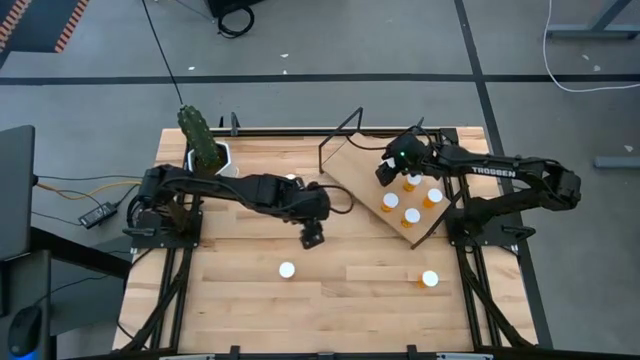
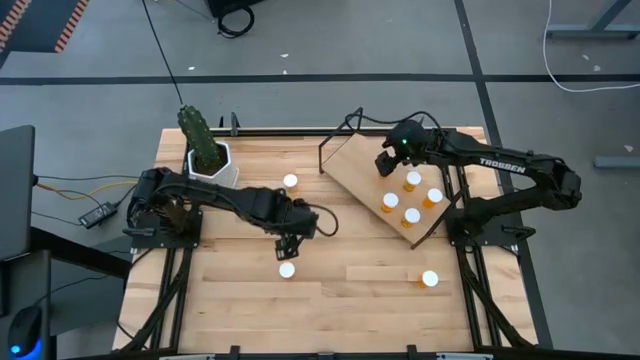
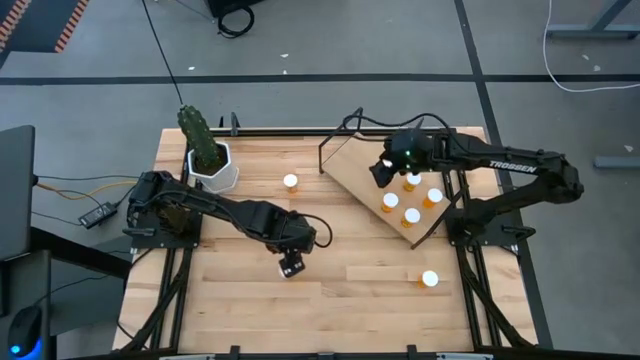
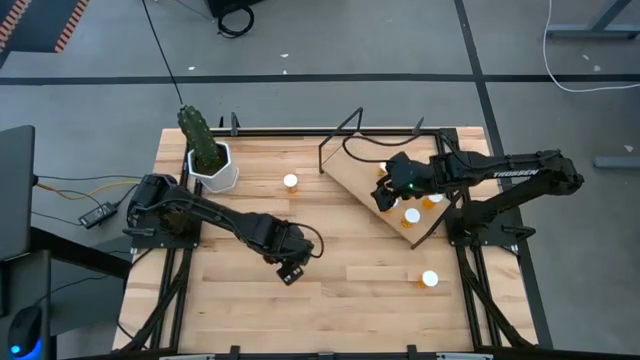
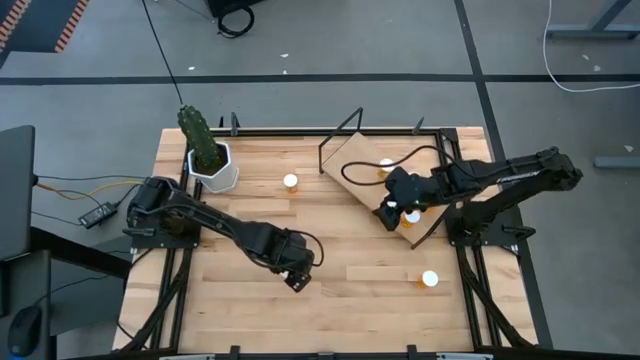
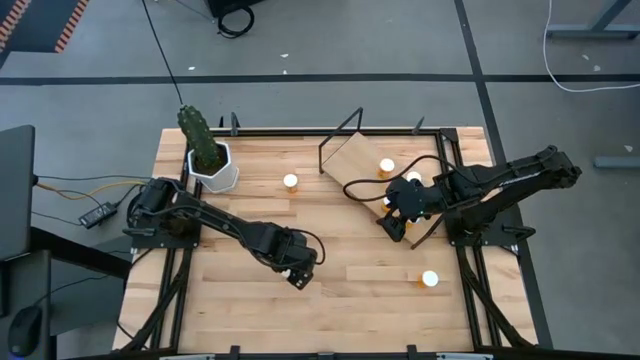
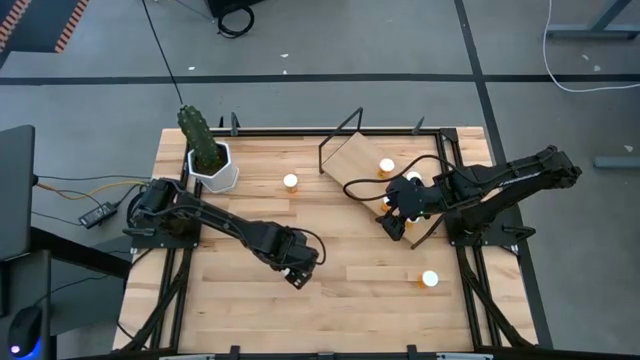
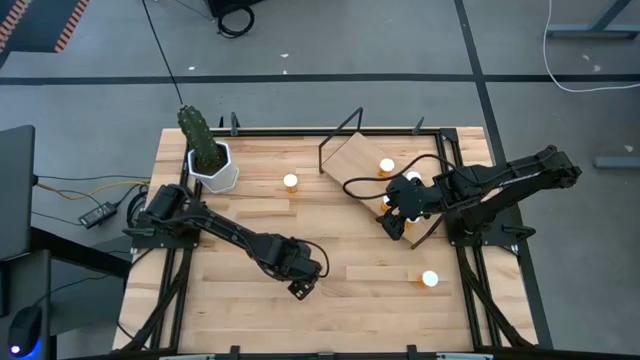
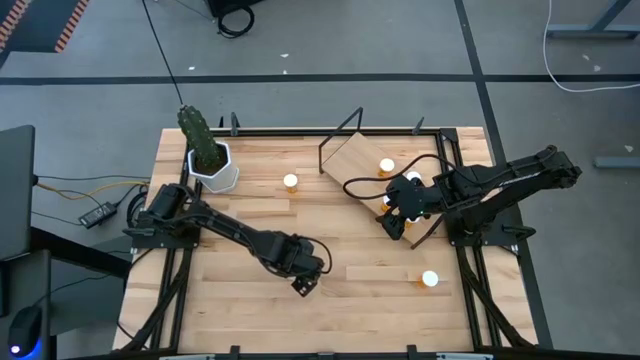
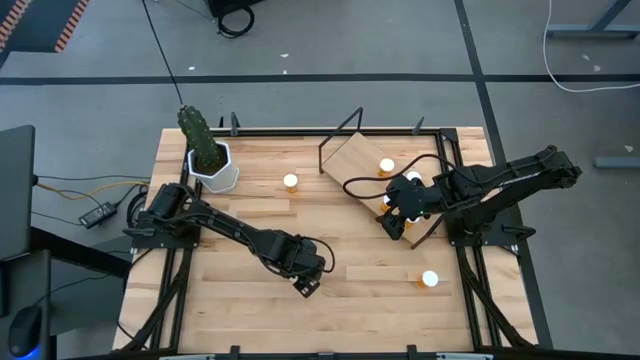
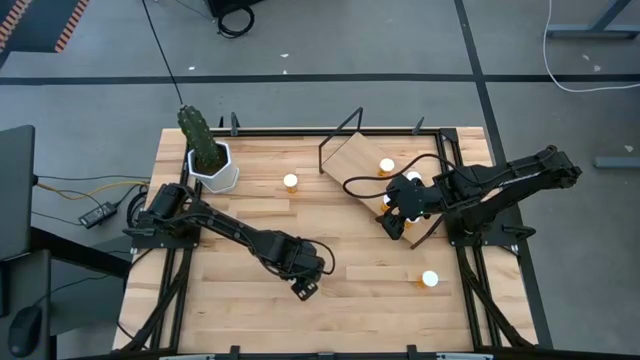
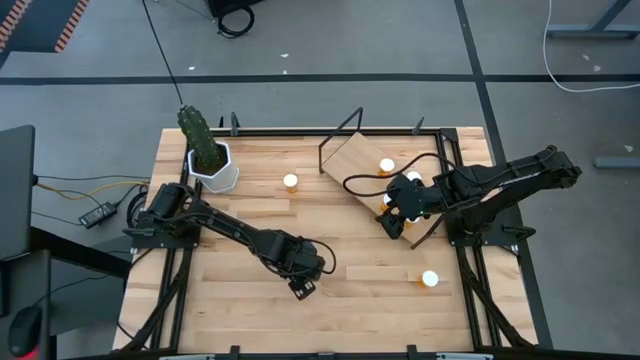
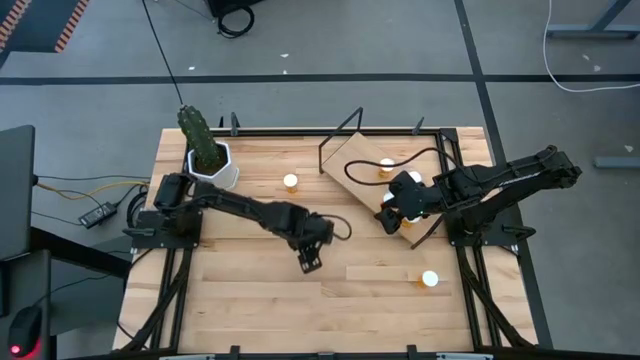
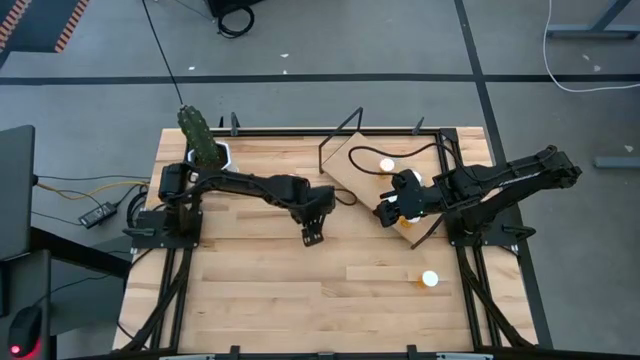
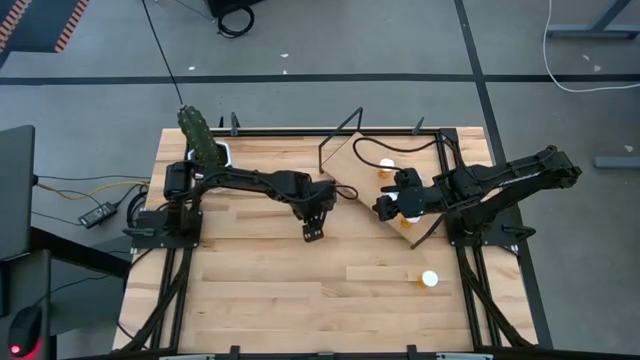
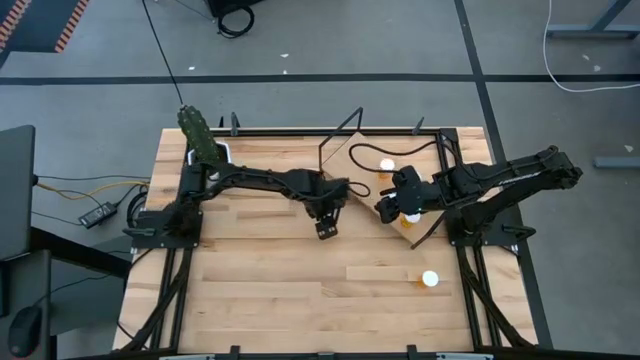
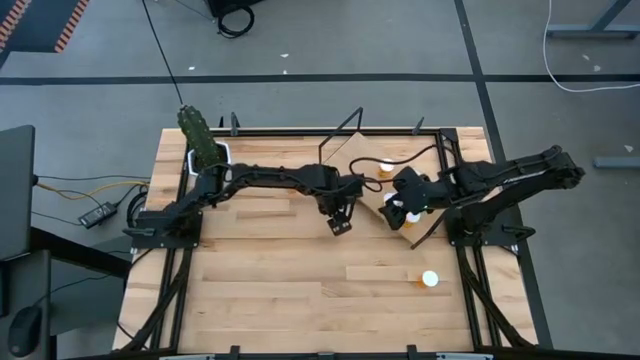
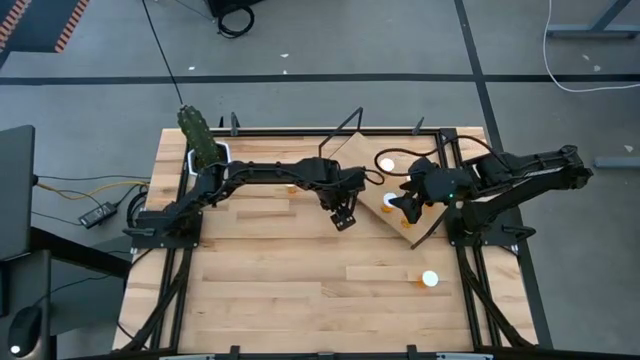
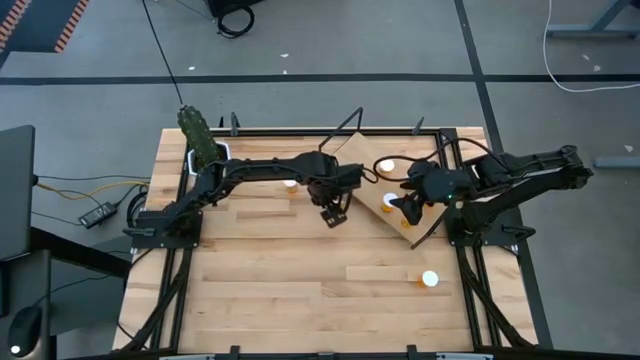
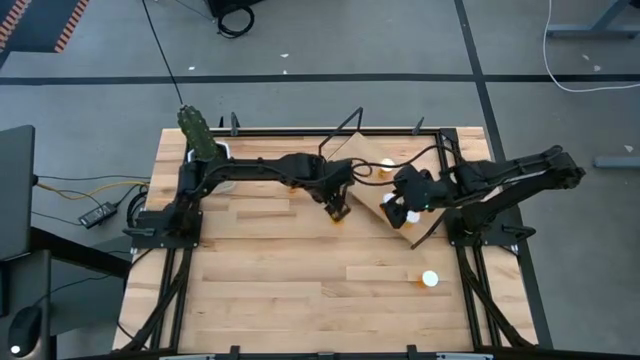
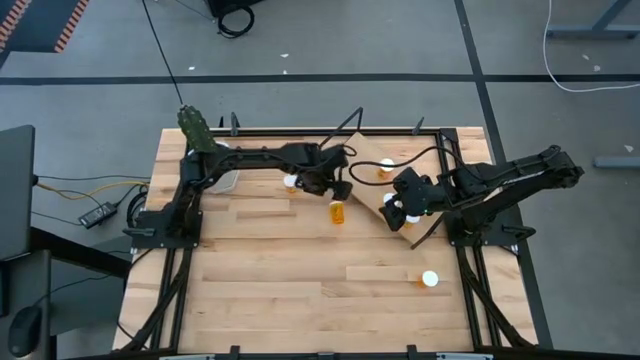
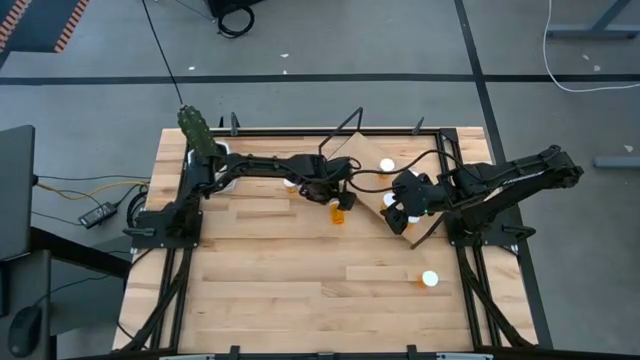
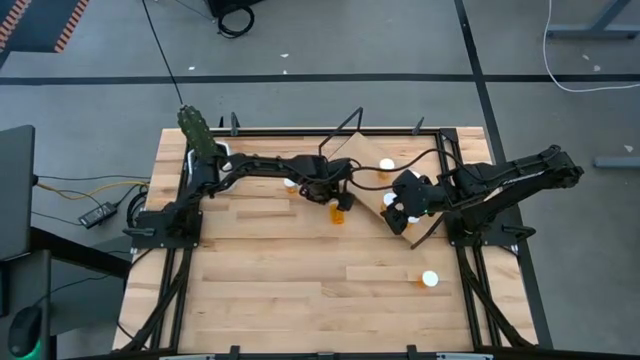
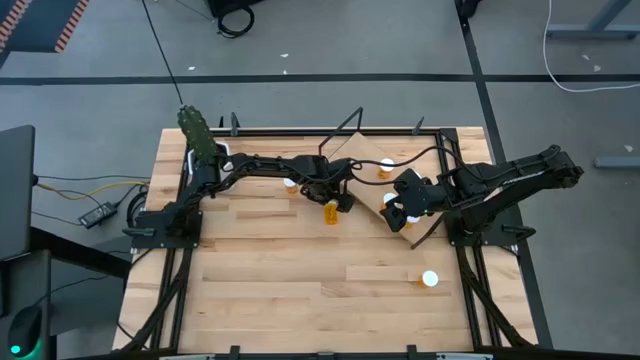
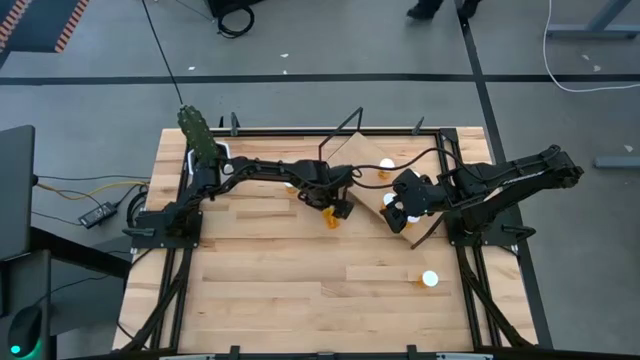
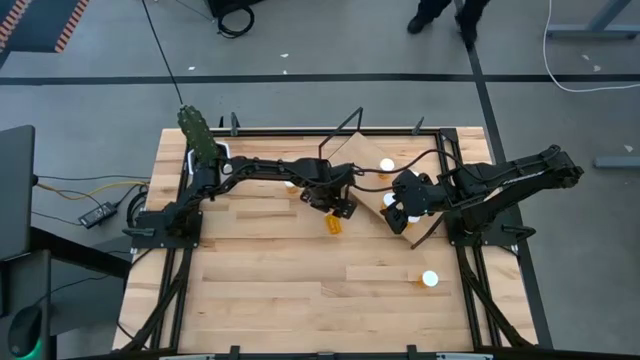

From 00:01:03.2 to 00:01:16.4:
Task: Pick and place medicine bottles onto shelf by color
Put the orange pill bottle on the shelf aligned with the middle left orange pill bottle

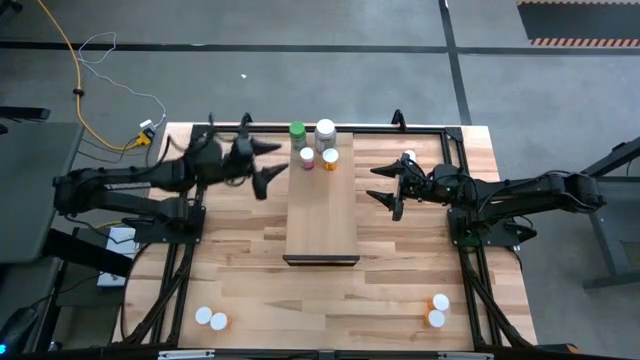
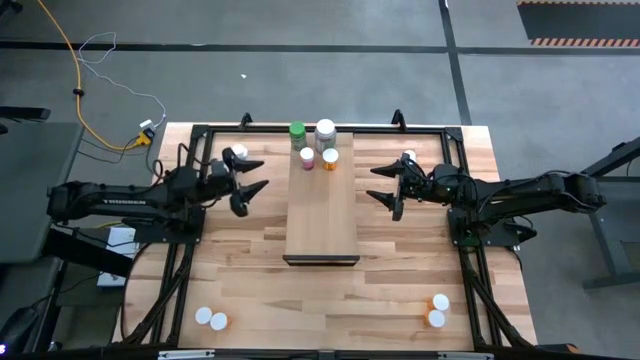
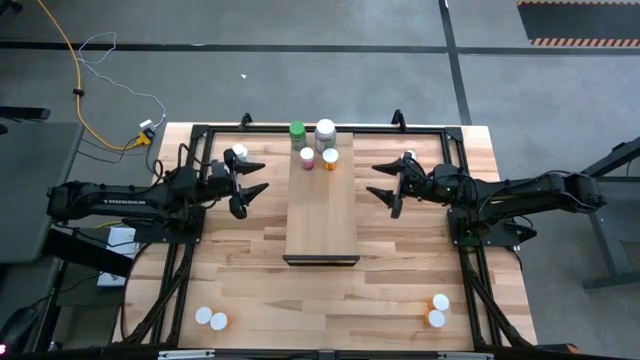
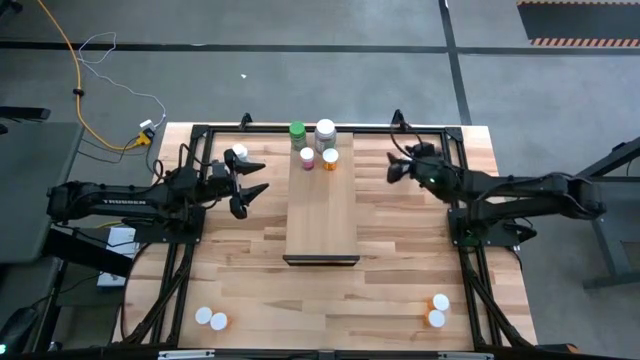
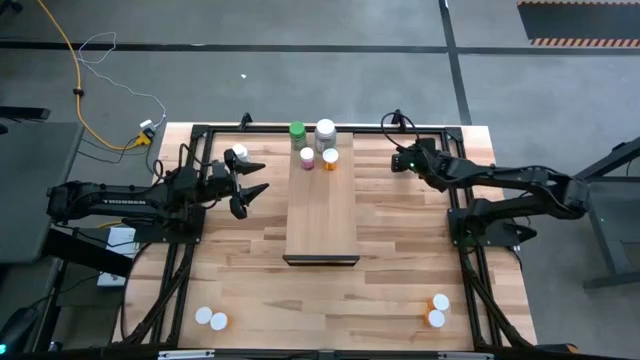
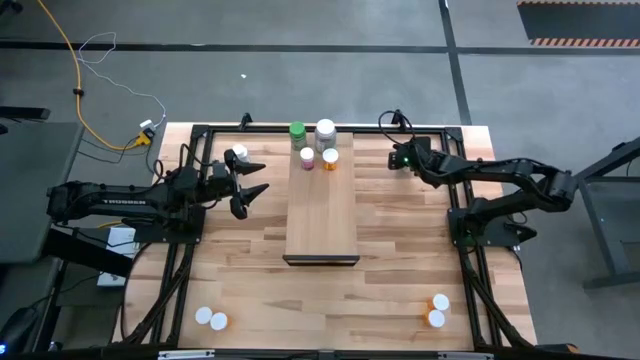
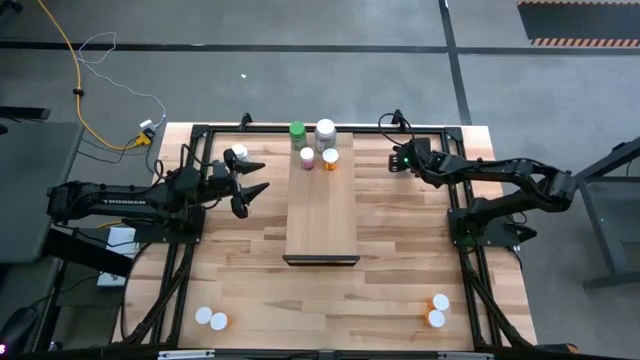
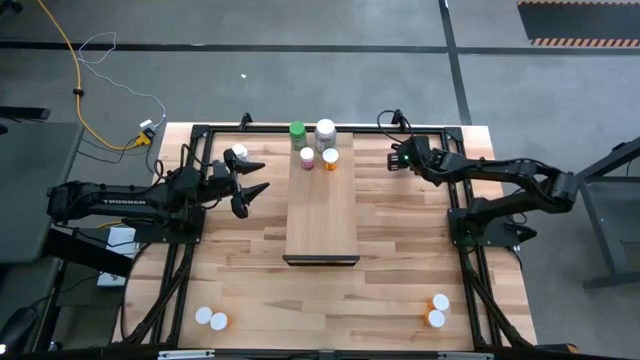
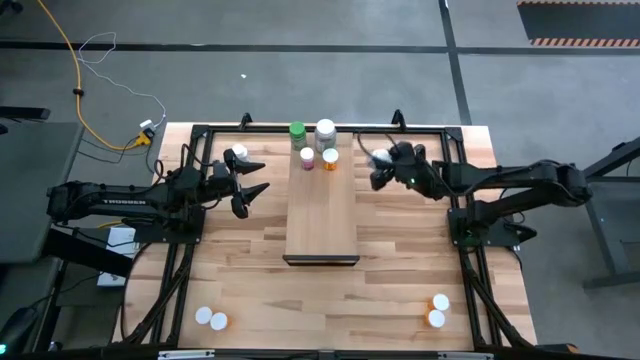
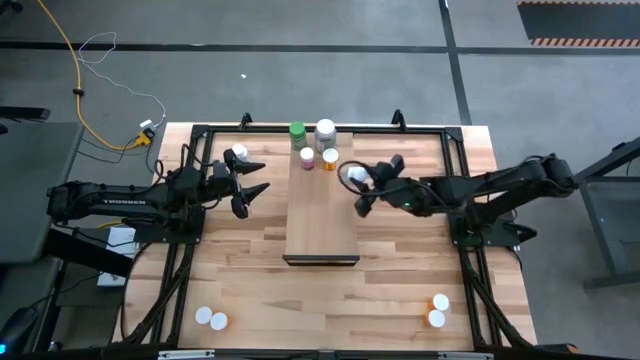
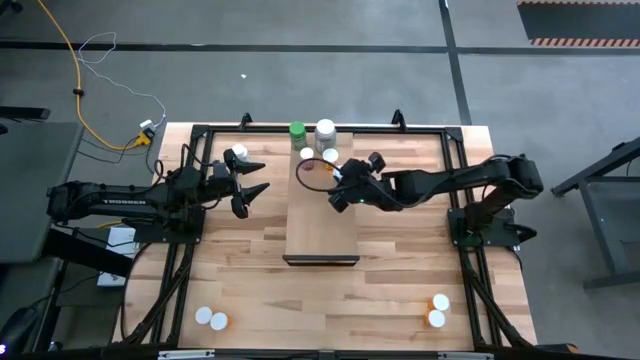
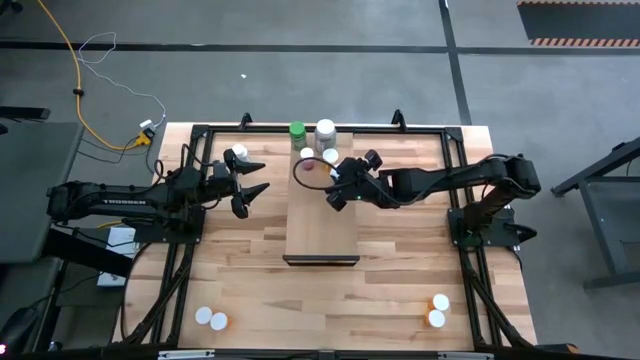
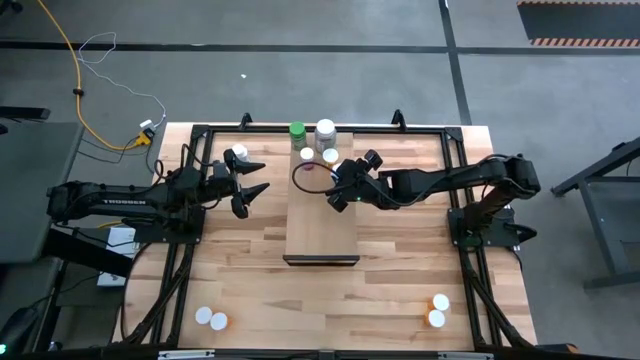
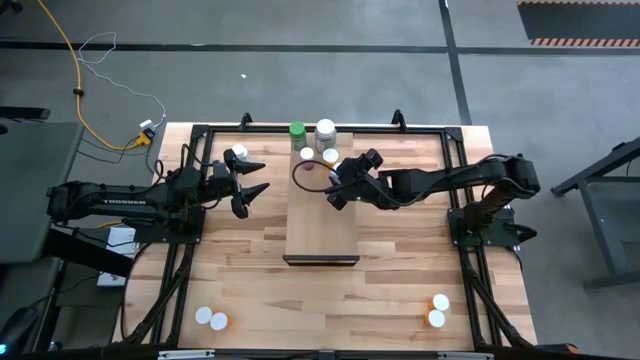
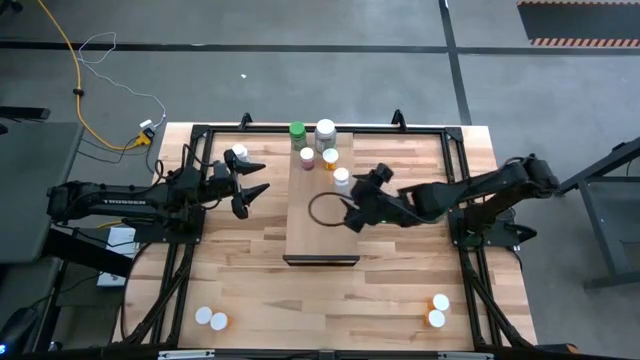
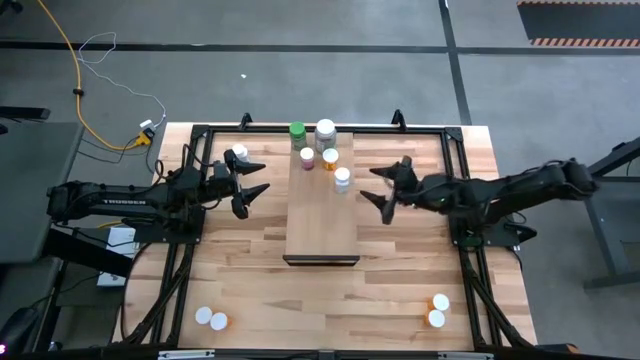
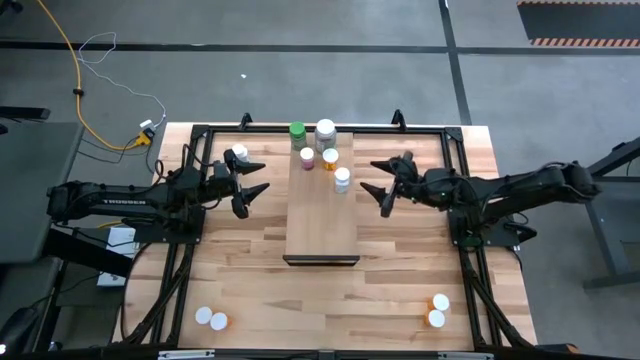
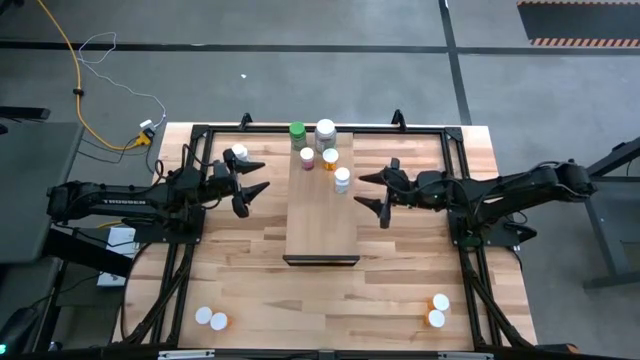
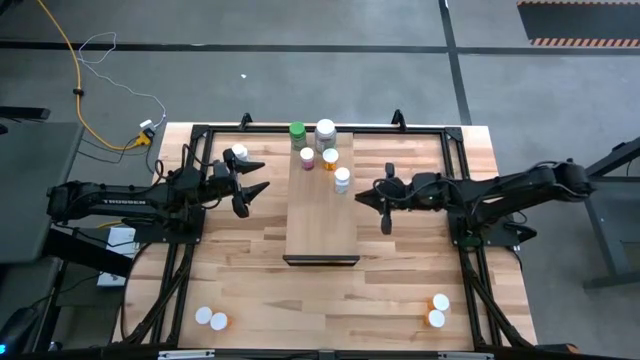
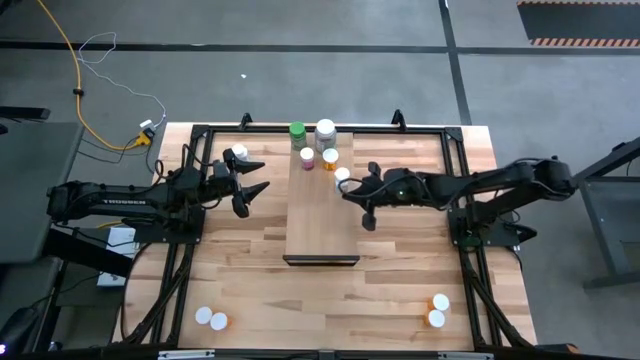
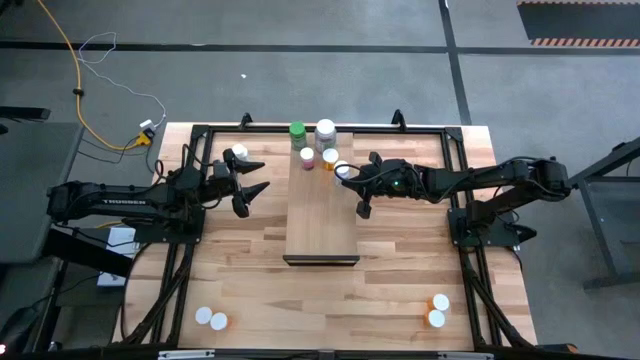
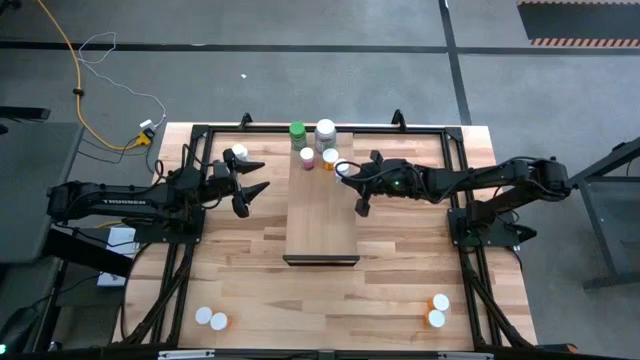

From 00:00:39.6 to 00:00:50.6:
Task: Pick and place medicine bottles onto shelf by color
Put the pill bottle on the shelf
